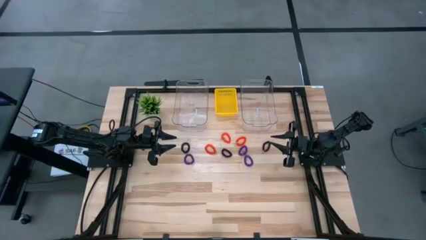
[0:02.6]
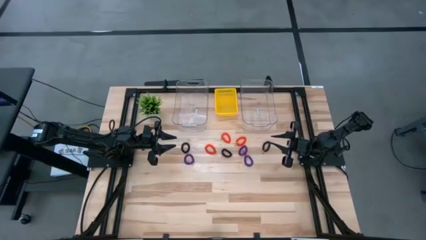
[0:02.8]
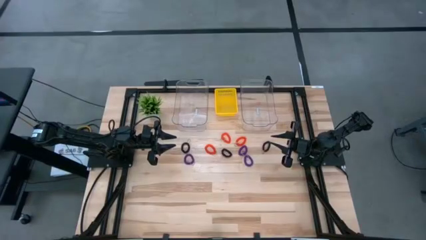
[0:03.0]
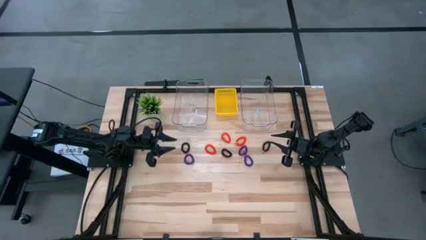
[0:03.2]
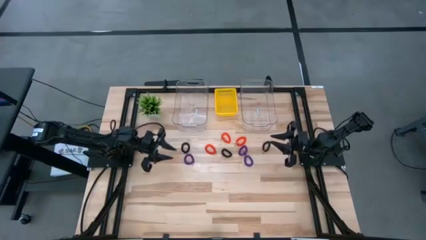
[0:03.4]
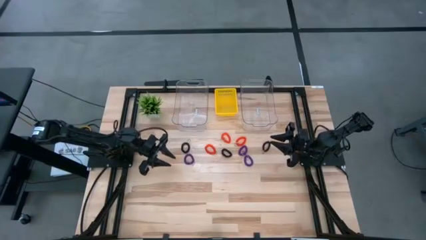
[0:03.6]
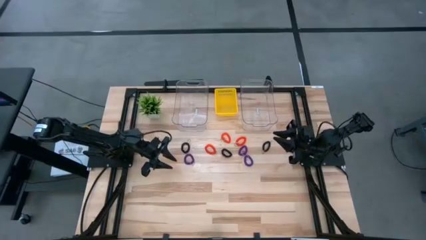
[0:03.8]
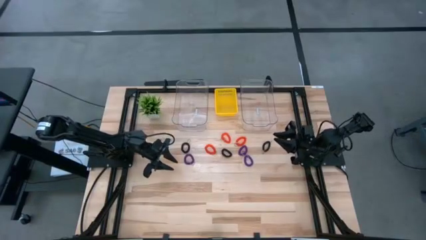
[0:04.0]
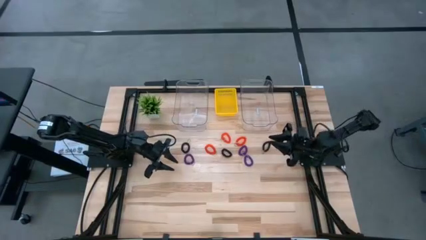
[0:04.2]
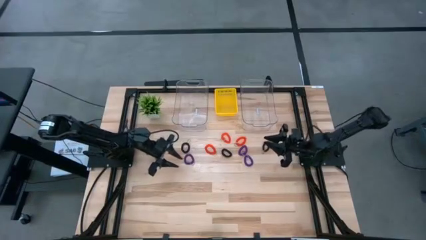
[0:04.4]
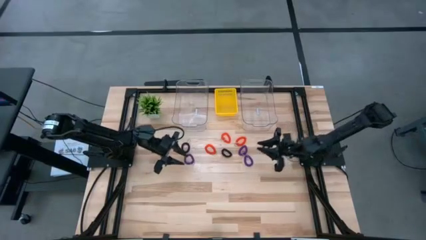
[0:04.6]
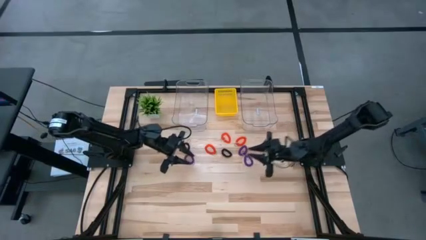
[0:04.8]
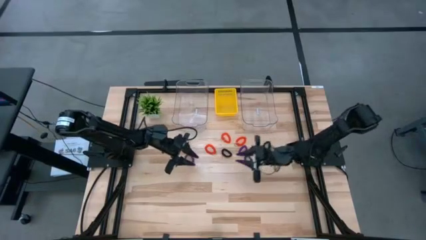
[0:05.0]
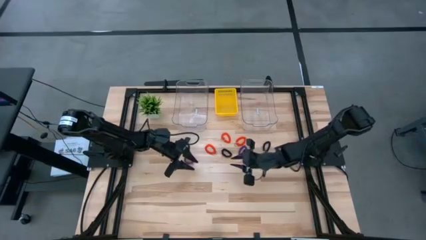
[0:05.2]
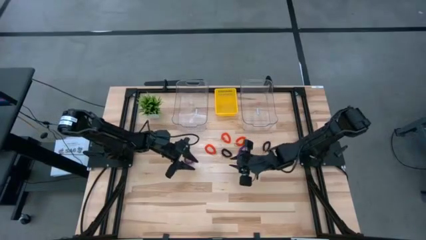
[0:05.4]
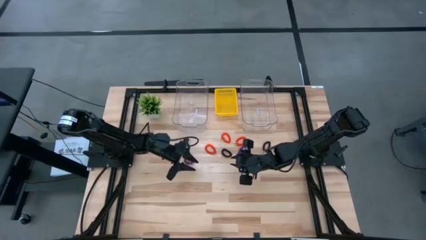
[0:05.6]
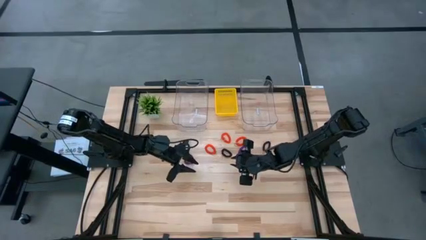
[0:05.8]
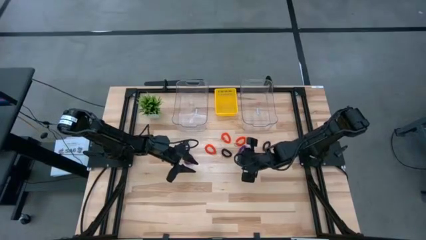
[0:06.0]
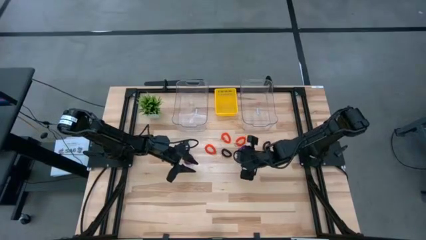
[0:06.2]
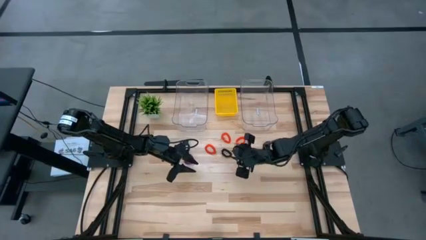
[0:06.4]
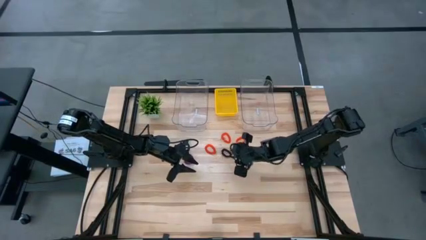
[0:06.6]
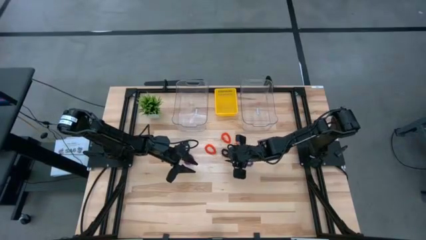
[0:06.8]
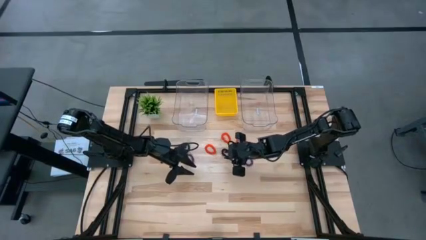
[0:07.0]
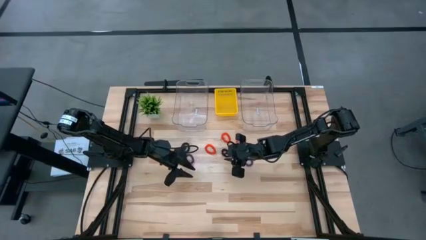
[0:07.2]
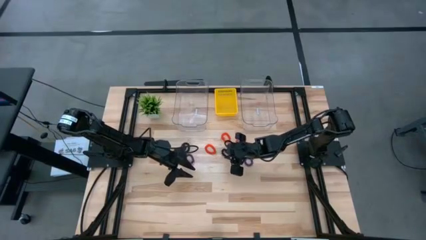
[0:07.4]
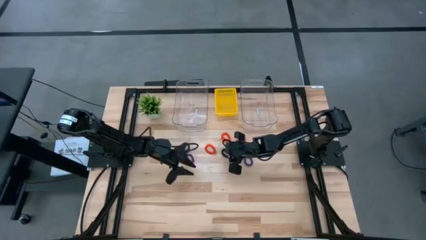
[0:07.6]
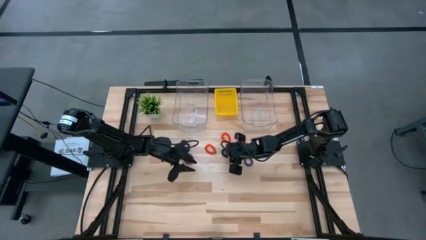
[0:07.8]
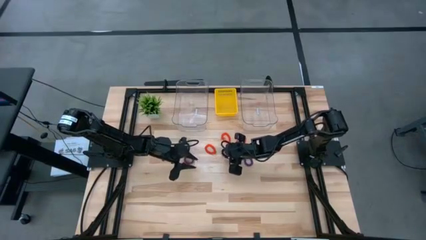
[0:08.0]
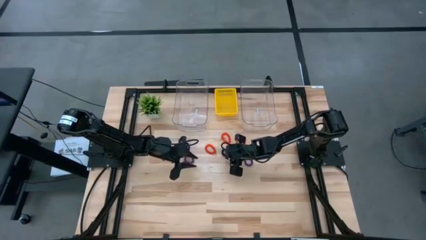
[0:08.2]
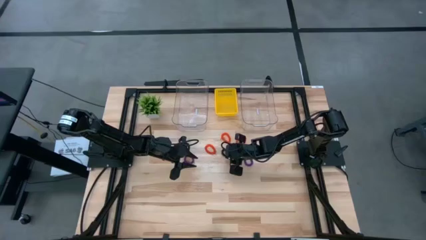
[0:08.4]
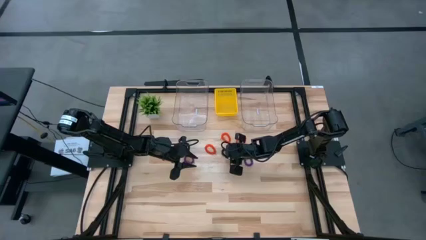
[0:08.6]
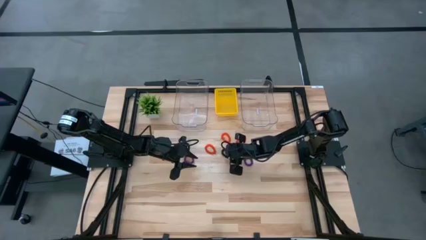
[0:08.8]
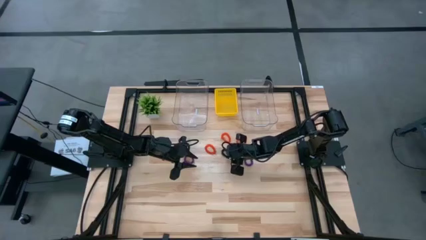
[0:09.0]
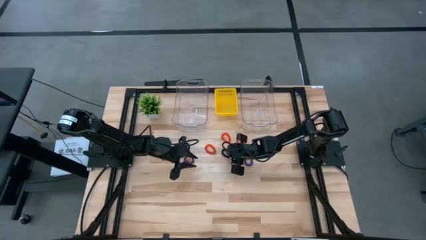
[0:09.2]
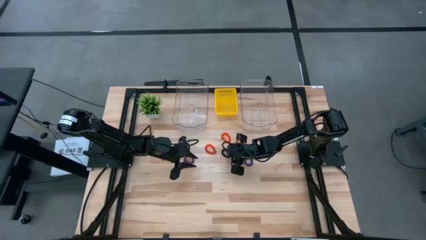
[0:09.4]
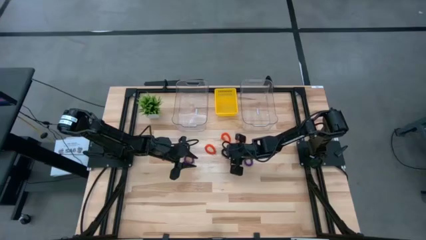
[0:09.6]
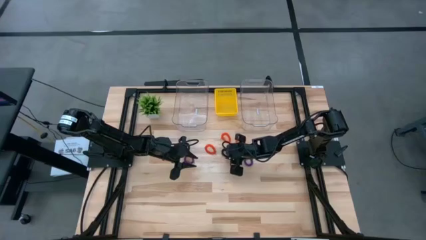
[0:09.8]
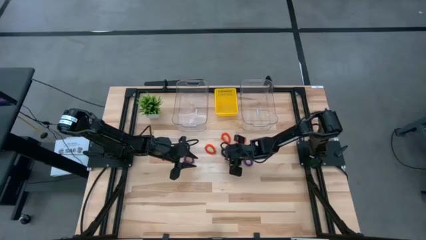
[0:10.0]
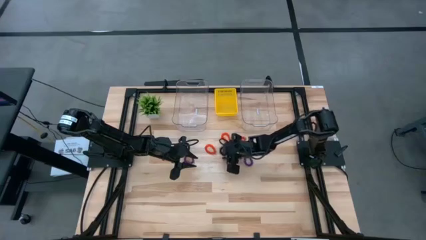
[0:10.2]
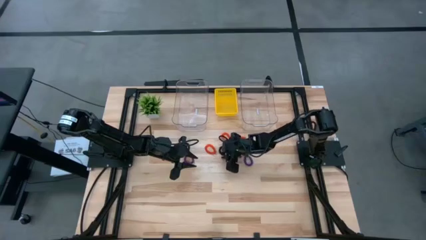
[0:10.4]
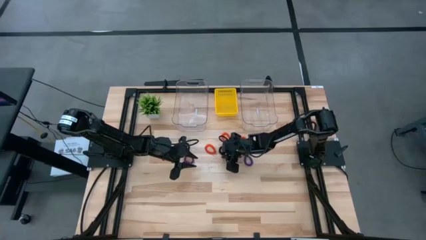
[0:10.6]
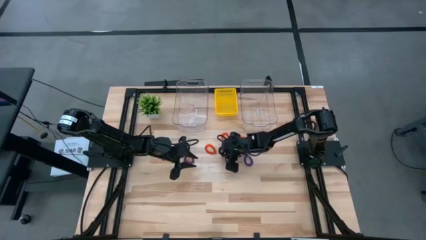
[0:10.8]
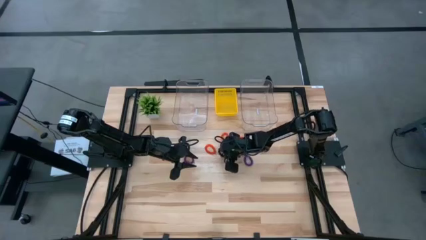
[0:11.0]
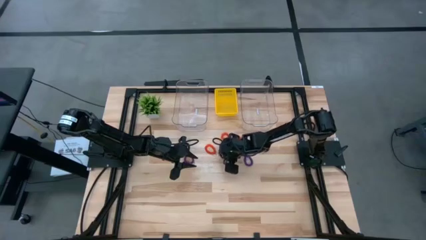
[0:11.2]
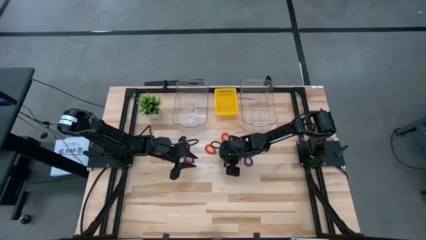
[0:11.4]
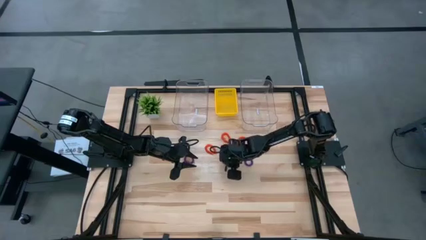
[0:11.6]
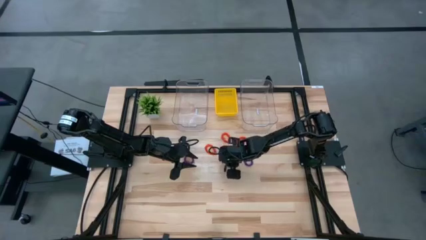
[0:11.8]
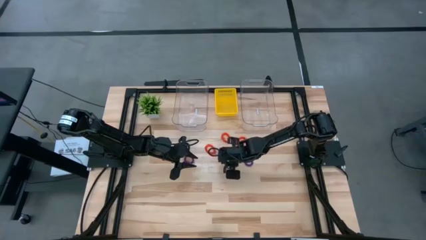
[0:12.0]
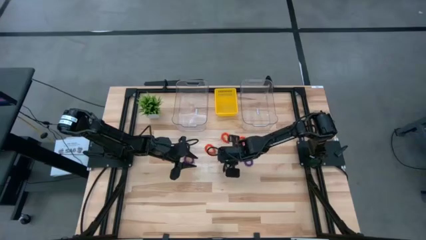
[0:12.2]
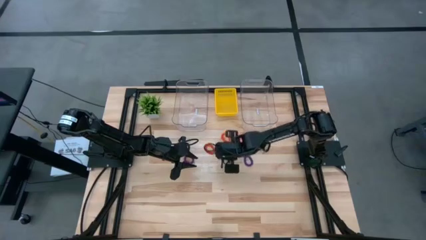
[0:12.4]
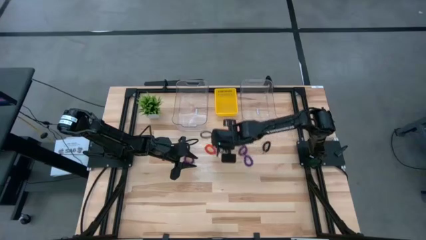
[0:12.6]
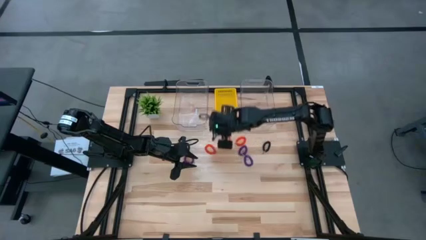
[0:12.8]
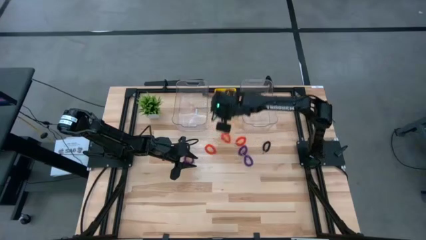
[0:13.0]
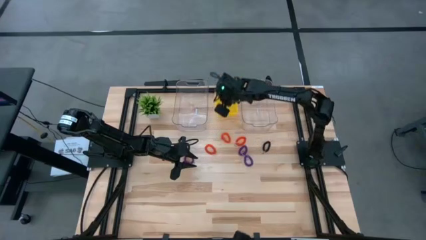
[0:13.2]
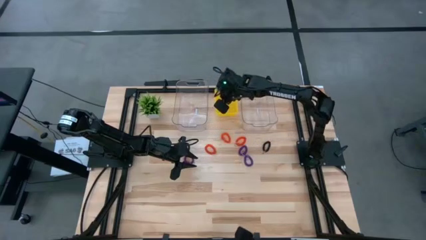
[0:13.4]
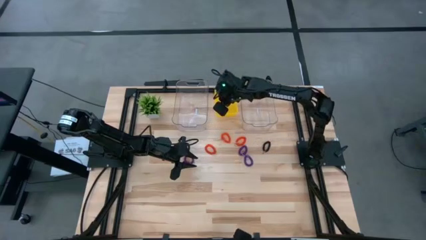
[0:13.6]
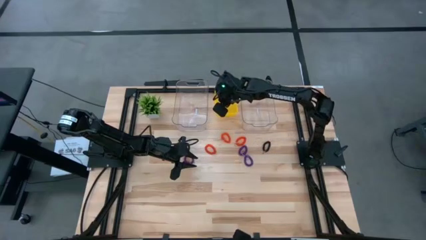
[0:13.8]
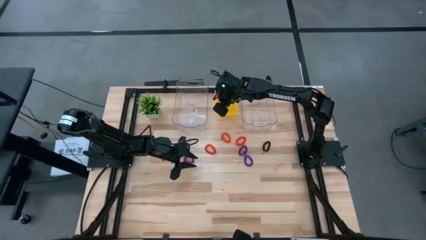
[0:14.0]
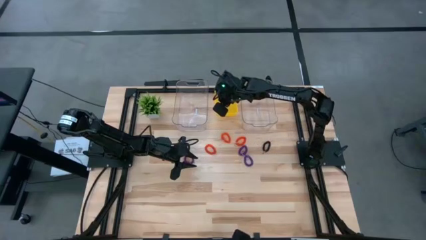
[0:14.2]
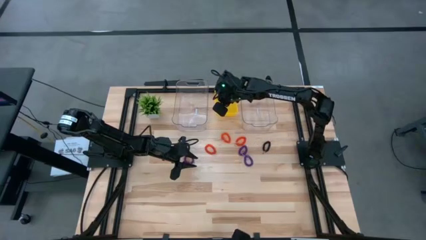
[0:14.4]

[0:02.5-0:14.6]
Task: Sort spring keychains
Put the middle black spring keychain into the yellow bin

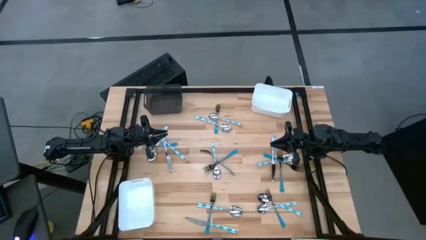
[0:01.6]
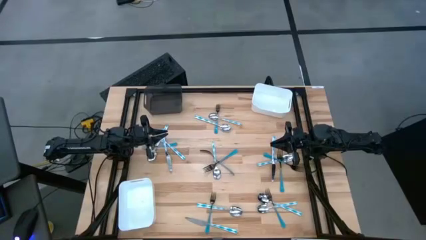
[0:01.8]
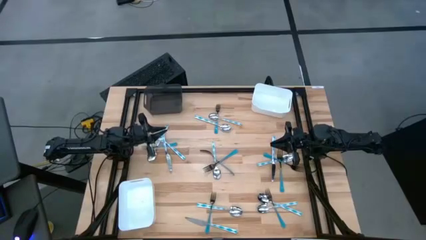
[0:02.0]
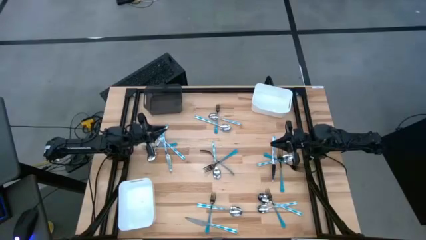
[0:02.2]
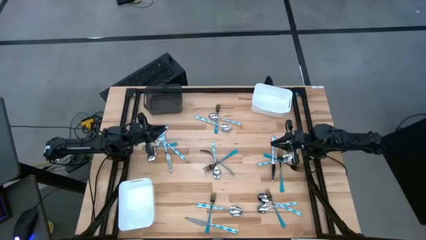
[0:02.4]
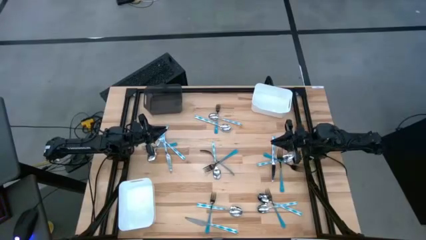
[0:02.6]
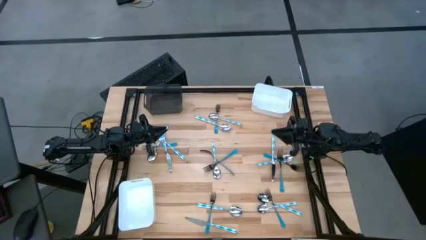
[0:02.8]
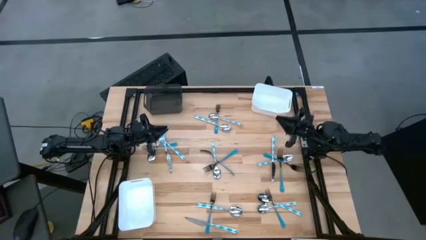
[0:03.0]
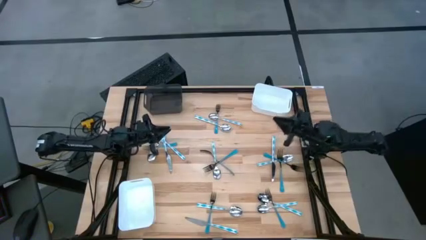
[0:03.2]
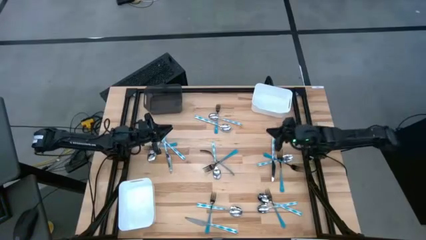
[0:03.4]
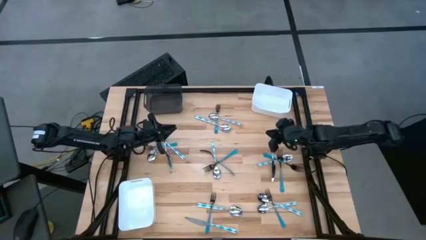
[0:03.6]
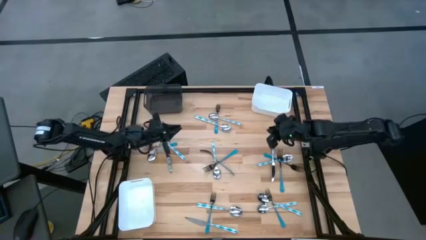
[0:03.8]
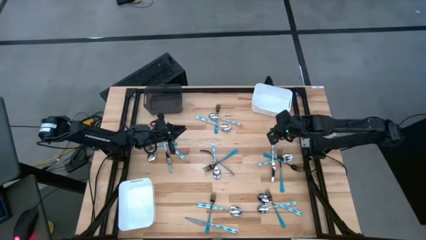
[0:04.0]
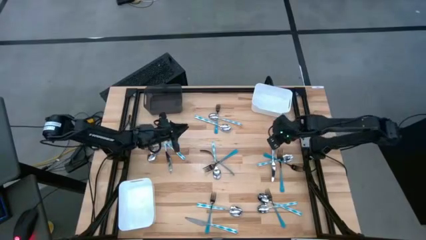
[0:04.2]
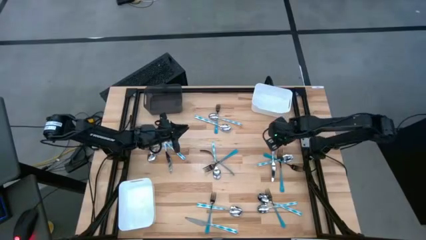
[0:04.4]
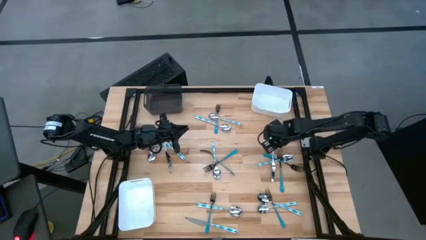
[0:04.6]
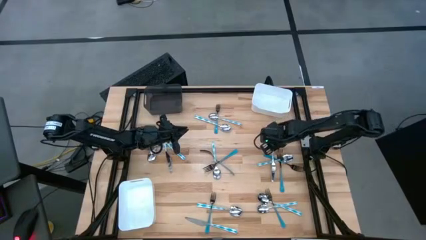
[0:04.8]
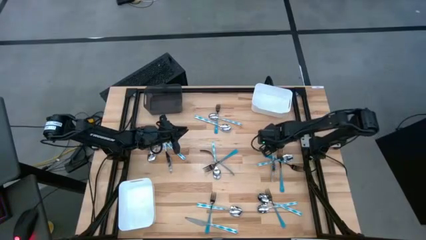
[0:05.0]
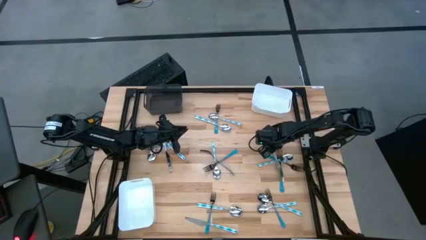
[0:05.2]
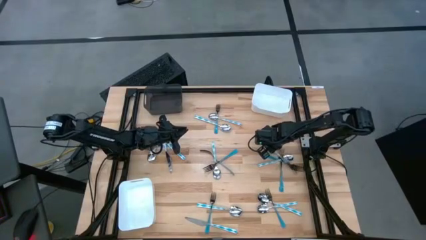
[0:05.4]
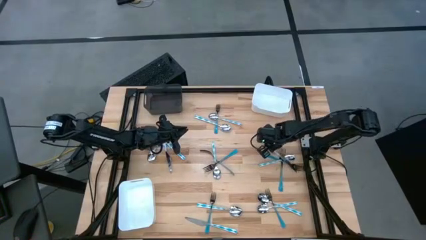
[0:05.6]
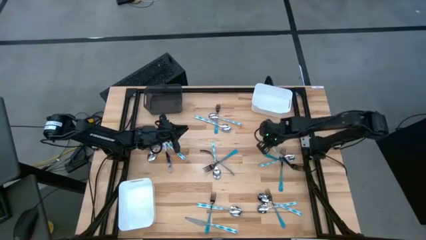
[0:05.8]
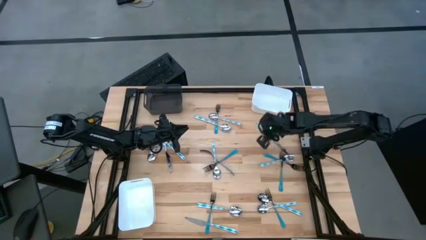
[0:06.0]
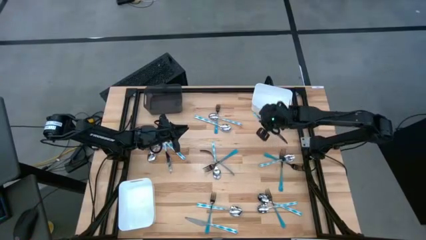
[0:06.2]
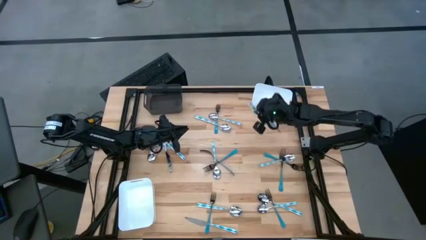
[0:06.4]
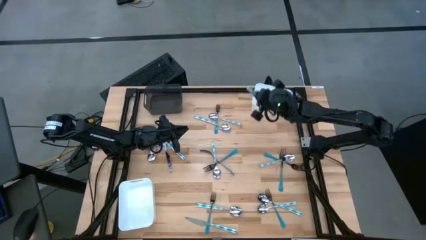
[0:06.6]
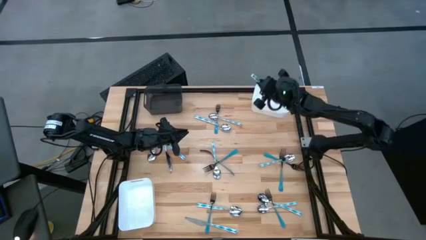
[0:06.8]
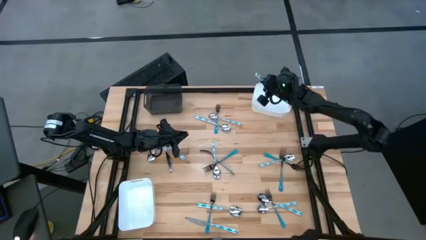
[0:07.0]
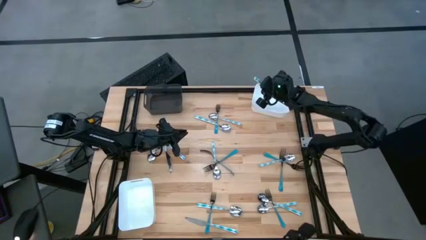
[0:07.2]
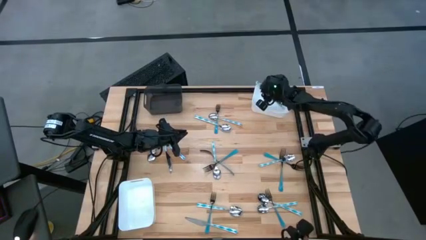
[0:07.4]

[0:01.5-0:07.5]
Task: Sort silverware by color (type)
Put the blue patterned table knife into the top white bin
